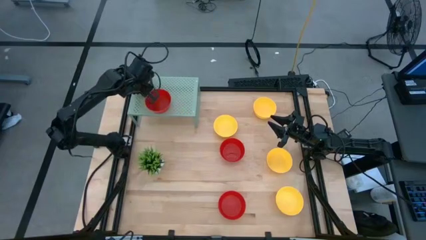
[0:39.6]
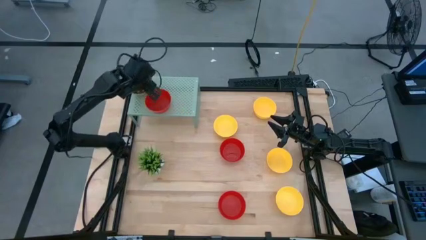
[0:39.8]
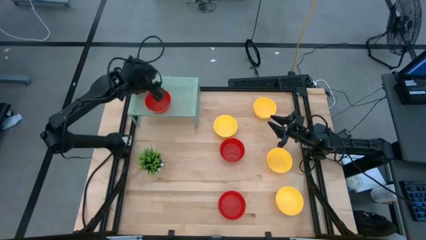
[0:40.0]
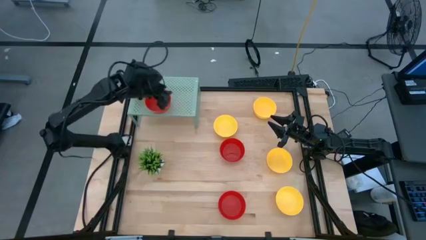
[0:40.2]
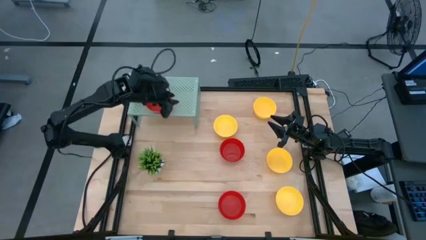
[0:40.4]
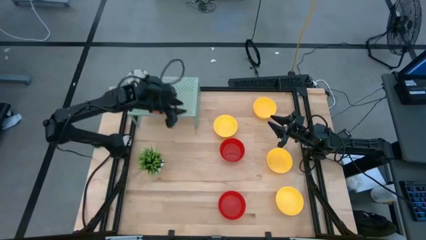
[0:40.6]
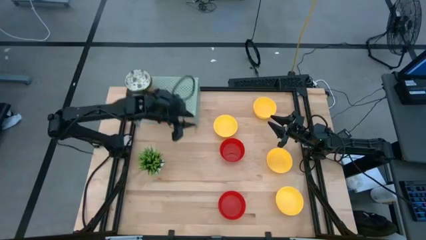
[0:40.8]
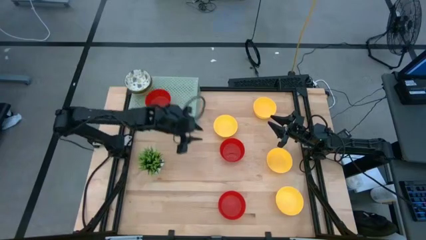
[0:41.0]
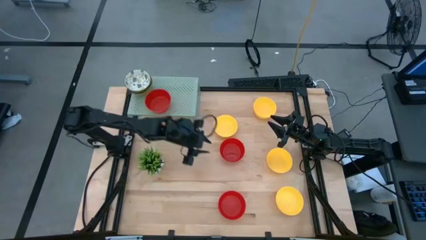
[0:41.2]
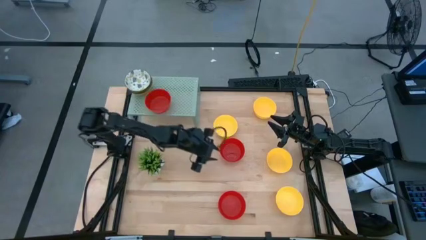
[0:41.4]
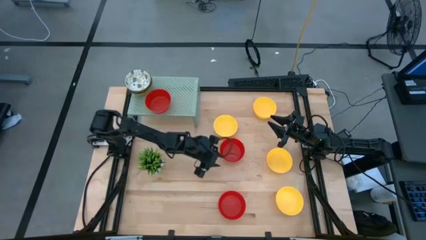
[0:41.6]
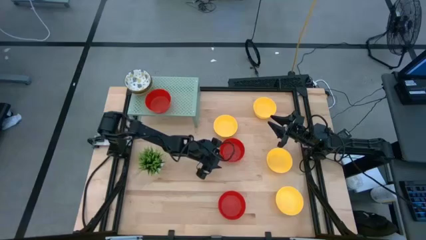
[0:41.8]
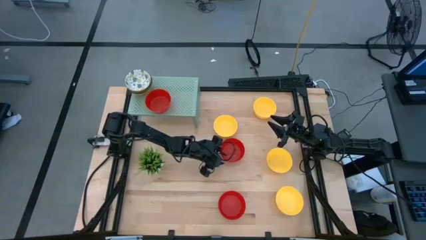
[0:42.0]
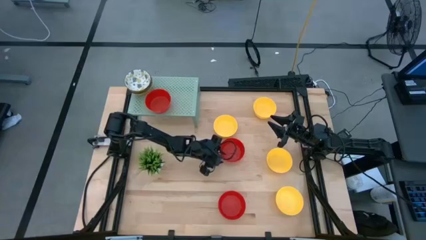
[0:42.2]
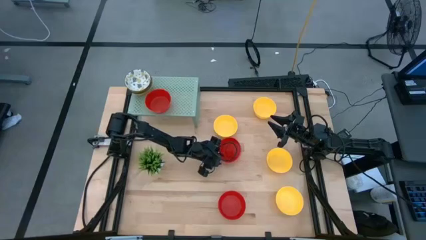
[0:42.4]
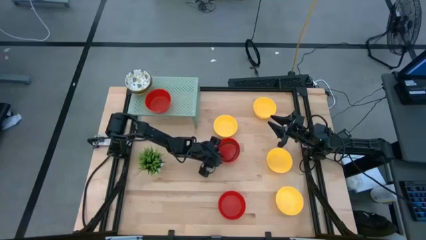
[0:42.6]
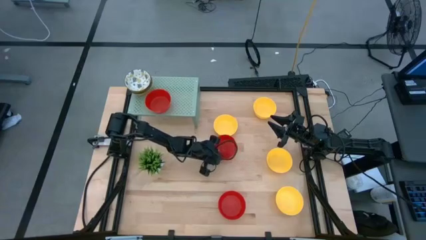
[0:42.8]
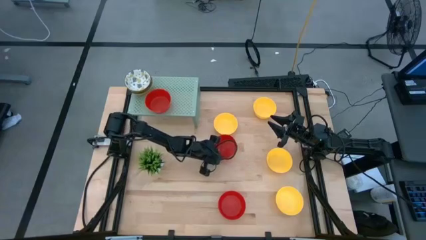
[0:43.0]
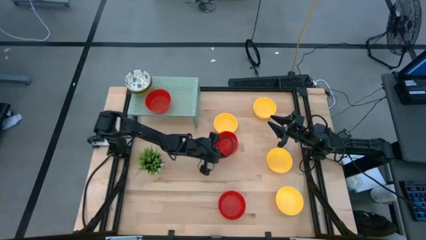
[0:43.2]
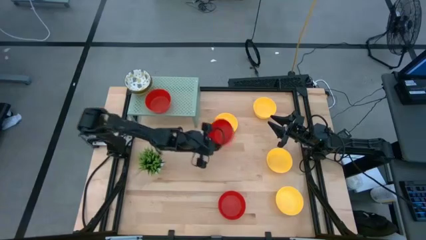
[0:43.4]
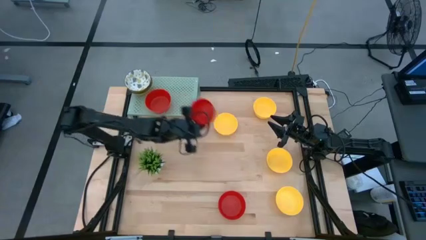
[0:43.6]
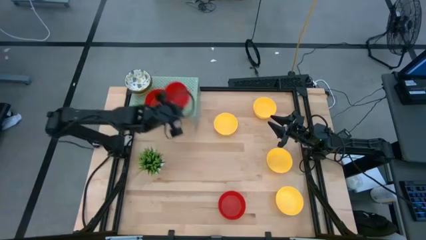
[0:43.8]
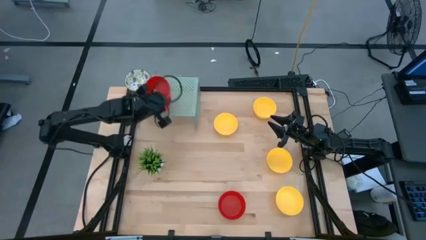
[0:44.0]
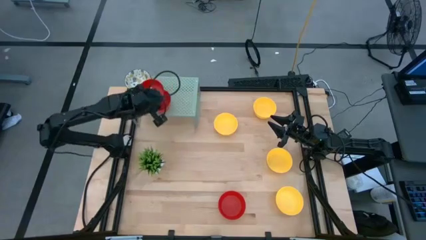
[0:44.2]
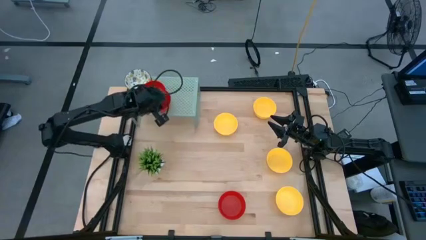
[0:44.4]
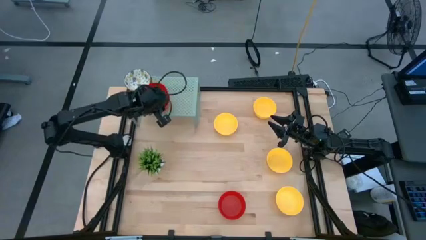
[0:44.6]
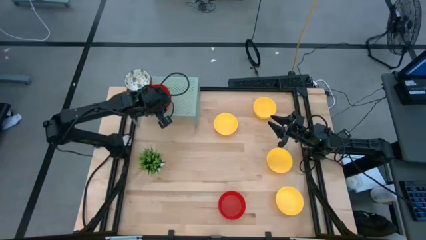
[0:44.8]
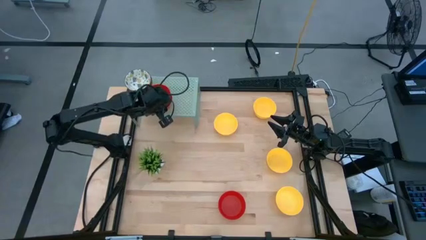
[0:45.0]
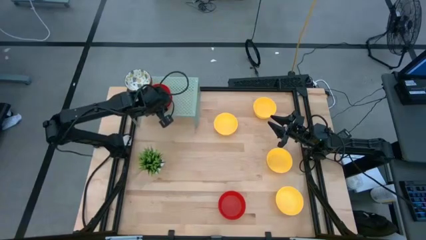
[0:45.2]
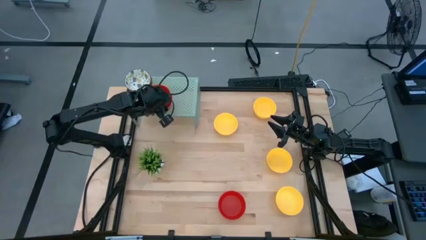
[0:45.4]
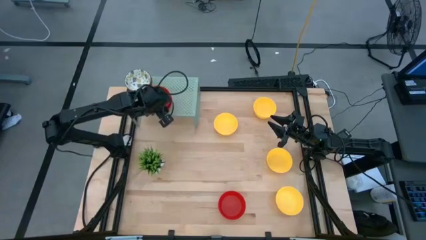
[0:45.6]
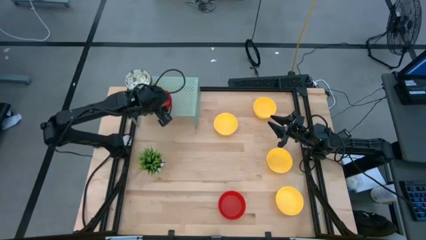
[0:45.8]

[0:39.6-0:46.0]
Task: Pick & Place Mini bowls
Stack the red bowl on the red bowl on the shelf

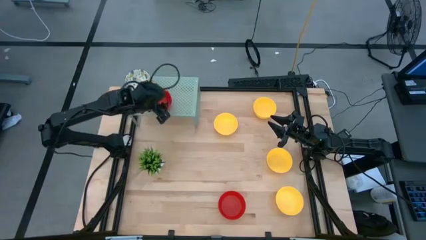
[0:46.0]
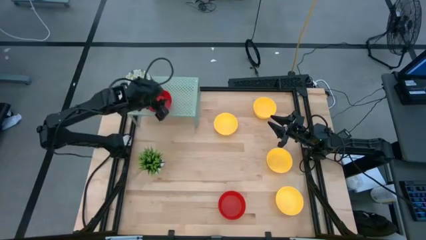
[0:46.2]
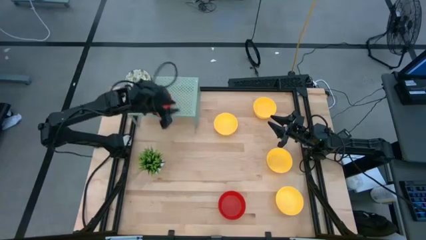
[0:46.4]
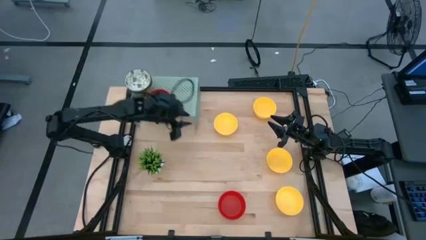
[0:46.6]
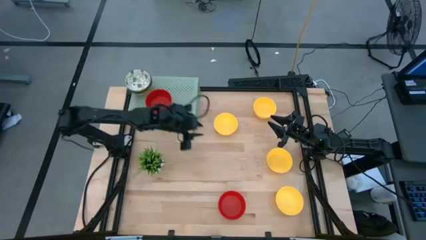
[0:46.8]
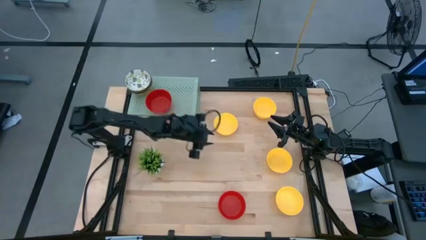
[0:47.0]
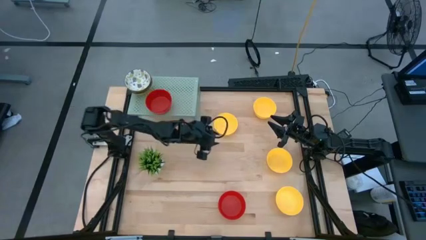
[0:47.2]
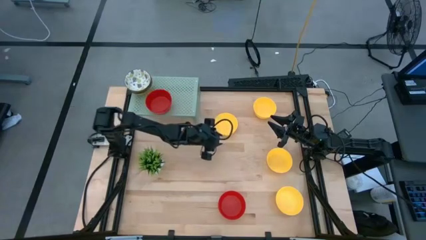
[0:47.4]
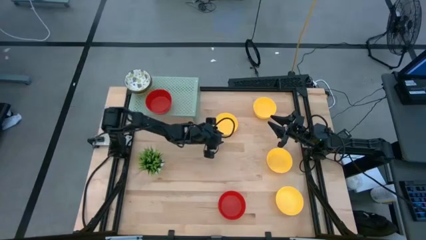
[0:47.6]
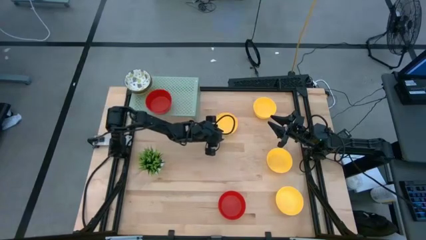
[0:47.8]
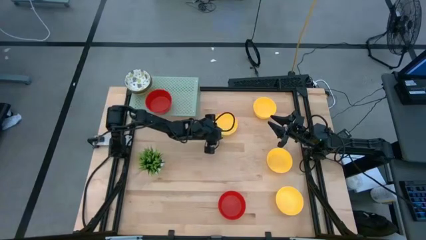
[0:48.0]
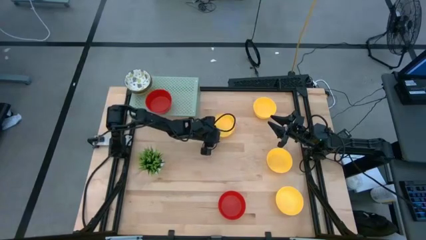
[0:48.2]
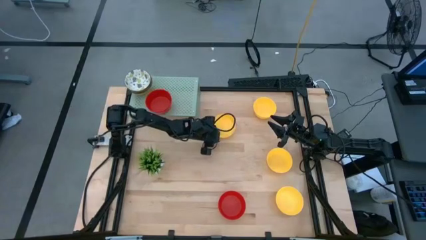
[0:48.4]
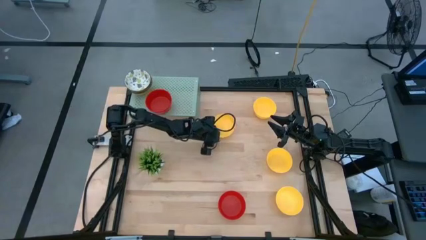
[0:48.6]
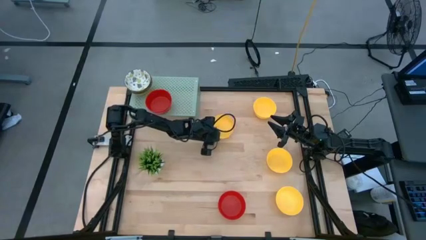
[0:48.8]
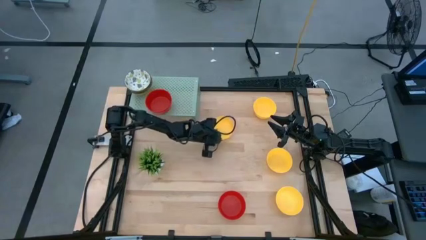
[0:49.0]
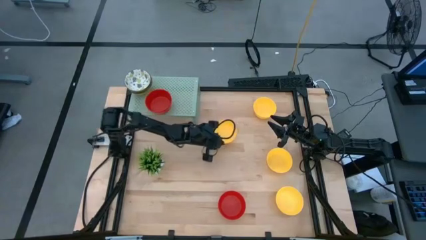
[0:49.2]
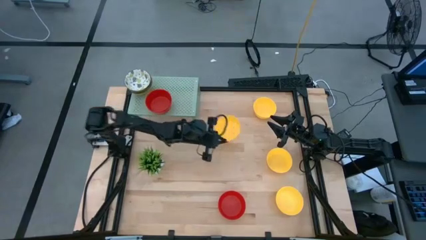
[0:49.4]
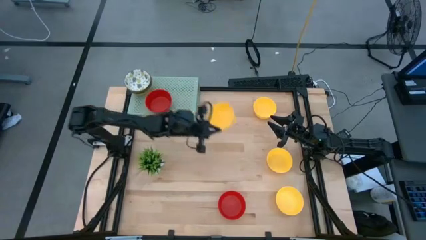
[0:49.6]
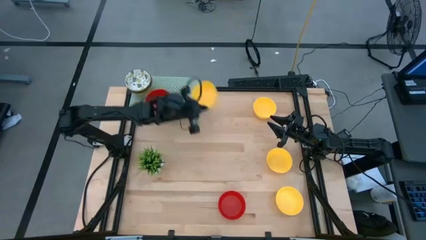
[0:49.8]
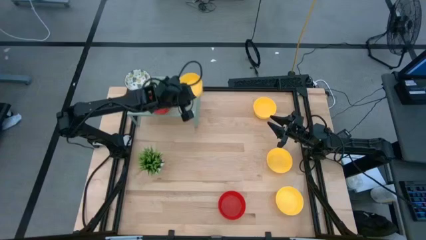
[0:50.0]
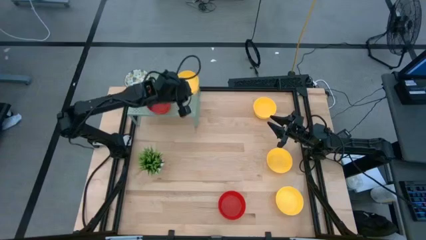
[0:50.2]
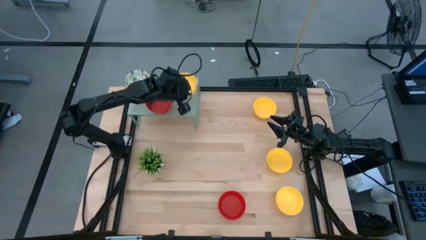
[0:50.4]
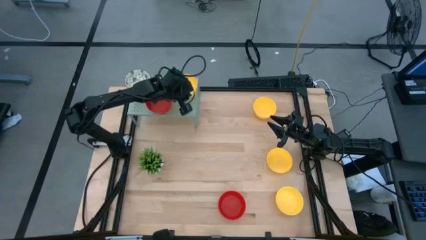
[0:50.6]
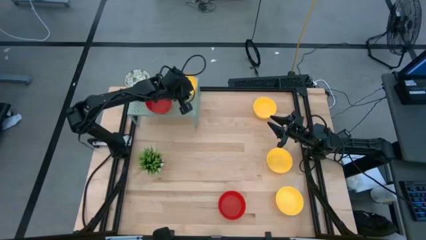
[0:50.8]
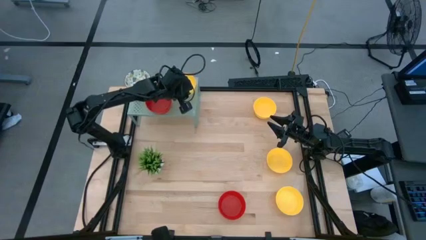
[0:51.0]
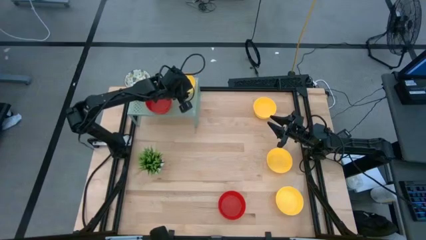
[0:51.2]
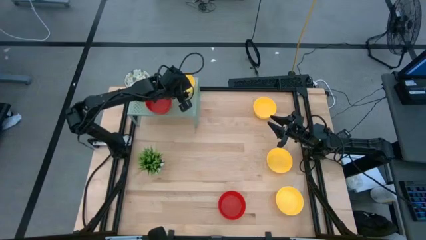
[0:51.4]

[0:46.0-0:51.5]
Put the yellow bowl on the shelf

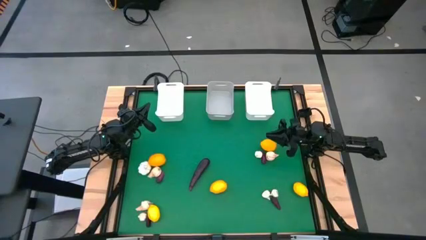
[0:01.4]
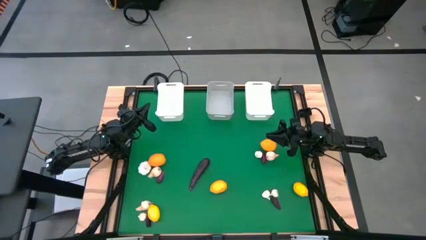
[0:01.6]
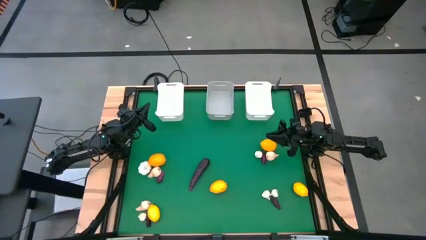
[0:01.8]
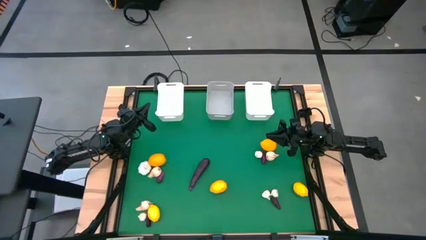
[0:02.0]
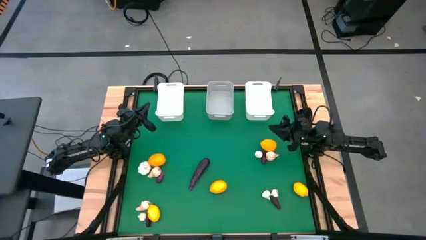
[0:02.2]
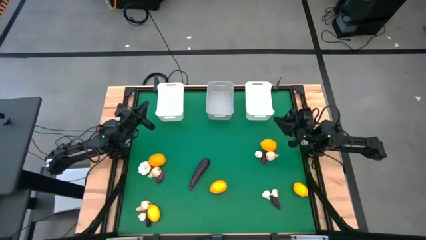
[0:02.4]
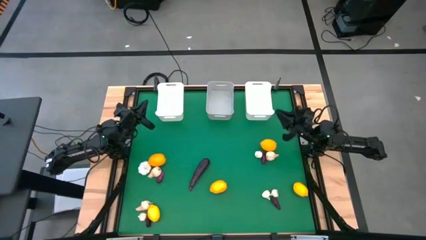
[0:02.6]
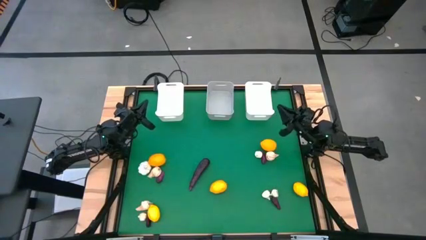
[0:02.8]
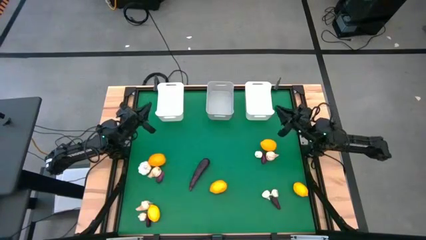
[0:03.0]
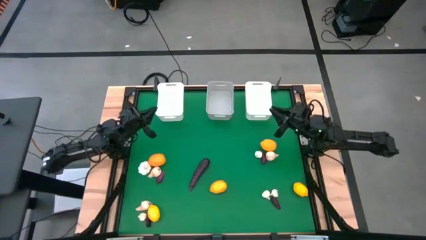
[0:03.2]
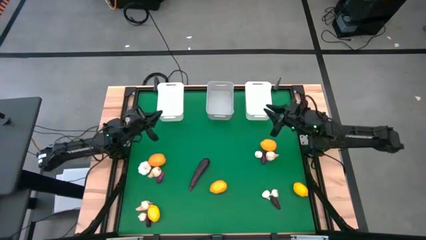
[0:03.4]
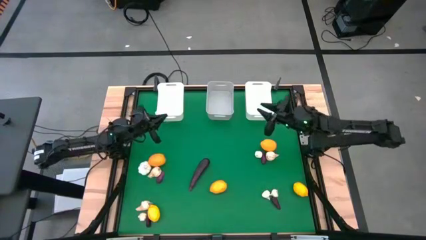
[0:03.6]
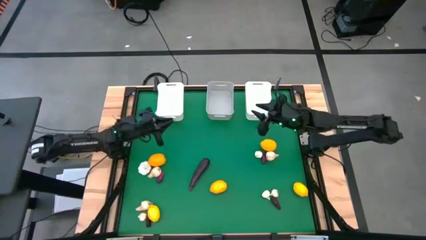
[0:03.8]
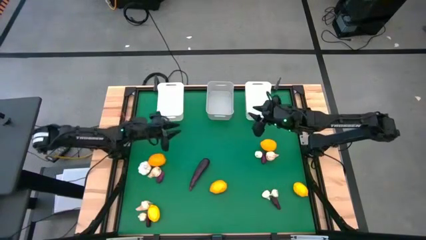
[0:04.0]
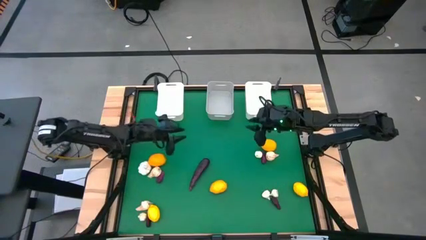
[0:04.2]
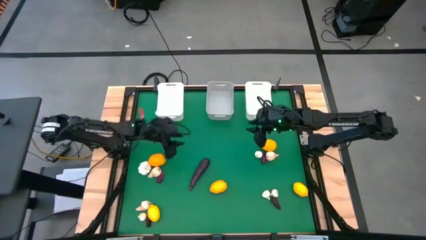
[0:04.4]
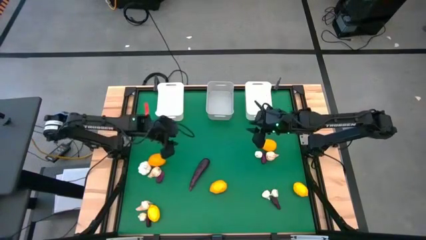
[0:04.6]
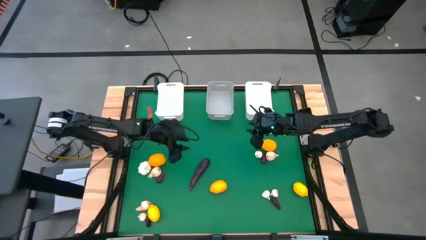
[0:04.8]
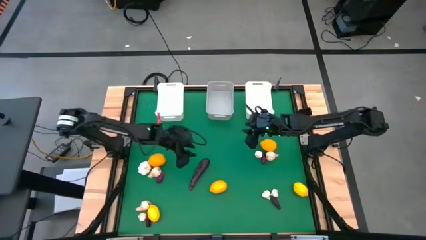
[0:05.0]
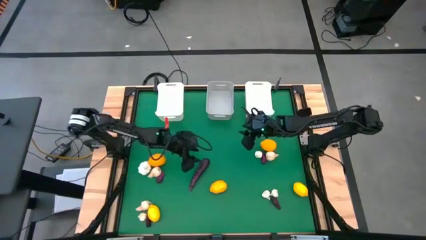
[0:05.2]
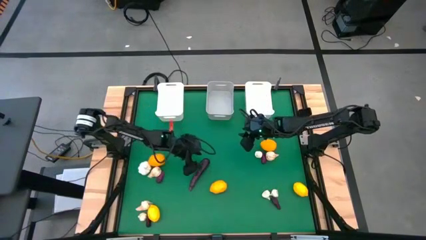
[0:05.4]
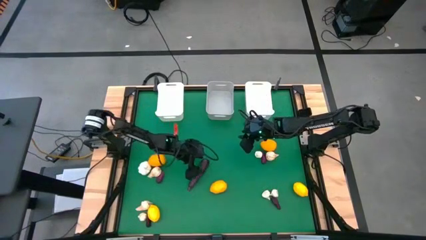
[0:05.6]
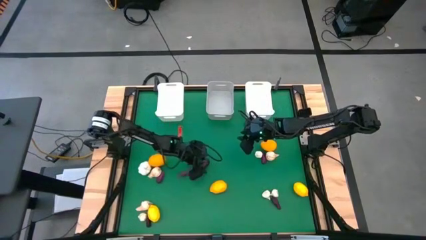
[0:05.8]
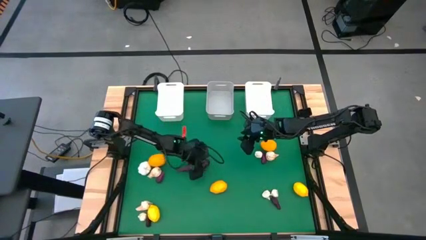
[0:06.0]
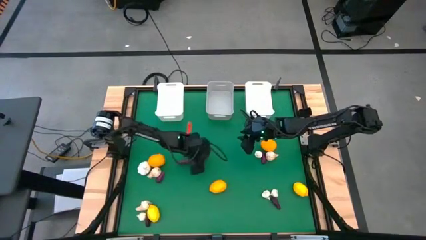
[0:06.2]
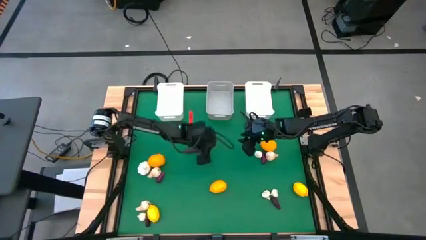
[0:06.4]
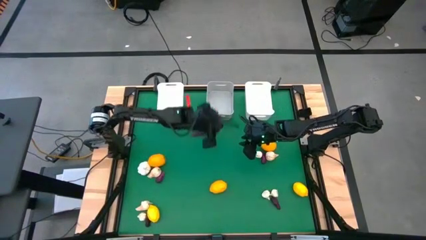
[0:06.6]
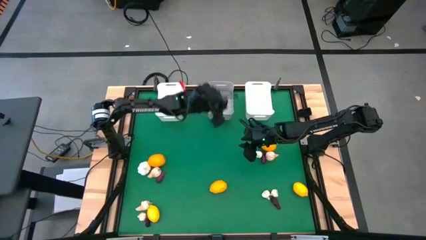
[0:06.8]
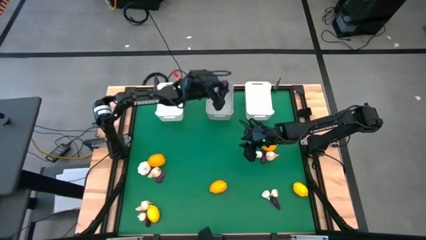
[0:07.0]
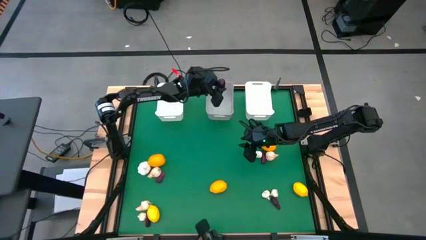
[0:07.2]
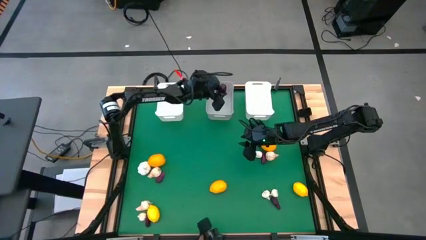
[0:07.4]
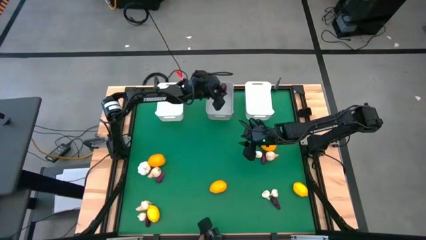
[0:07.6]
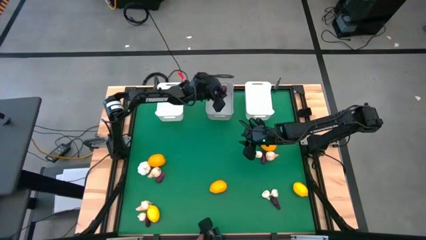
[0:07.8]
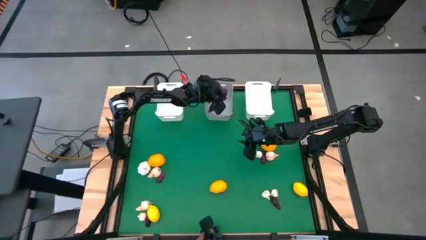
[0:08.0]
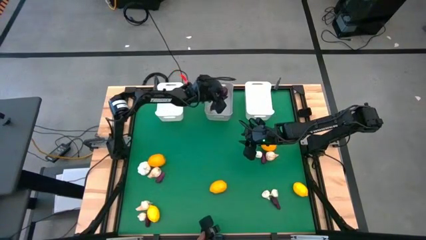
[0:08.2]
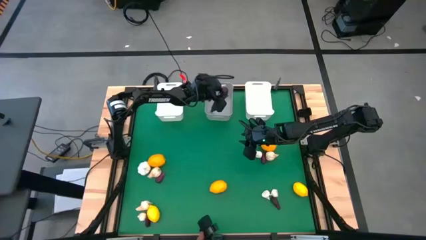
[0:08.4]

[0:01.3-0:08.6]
Task: Sort produce into baskets
Put the eggplant into the gray bin
